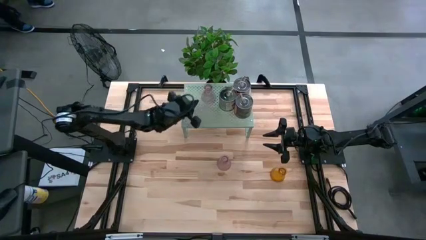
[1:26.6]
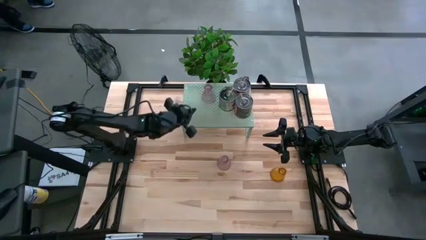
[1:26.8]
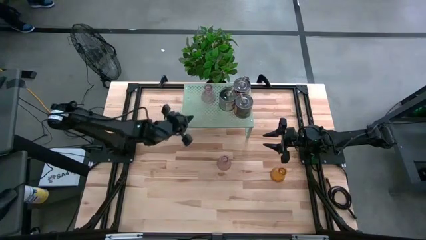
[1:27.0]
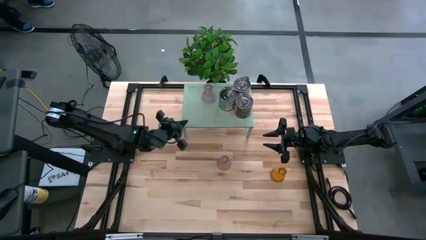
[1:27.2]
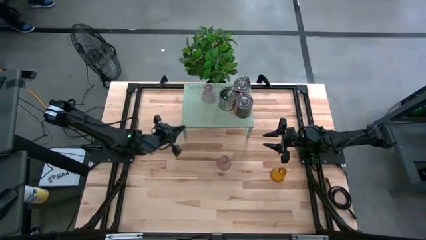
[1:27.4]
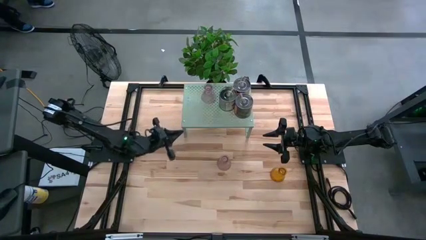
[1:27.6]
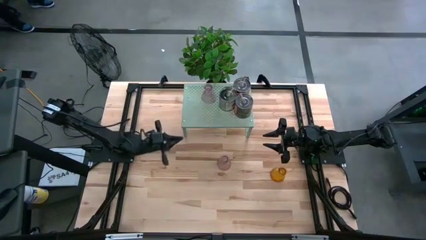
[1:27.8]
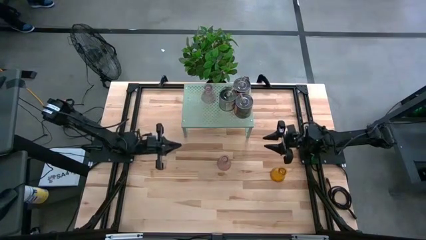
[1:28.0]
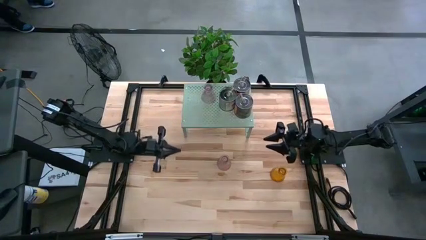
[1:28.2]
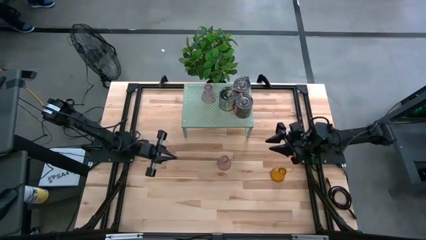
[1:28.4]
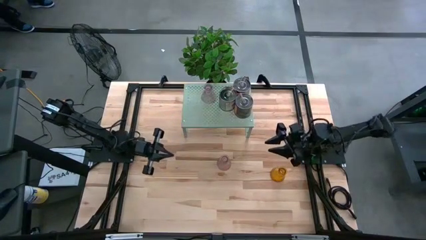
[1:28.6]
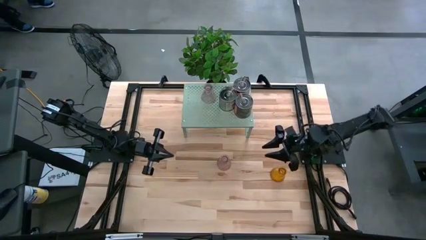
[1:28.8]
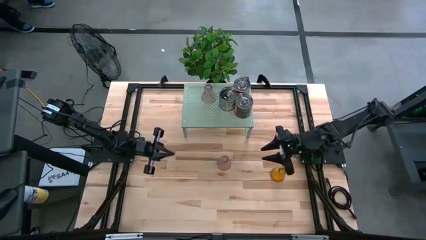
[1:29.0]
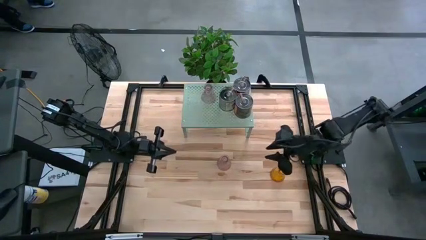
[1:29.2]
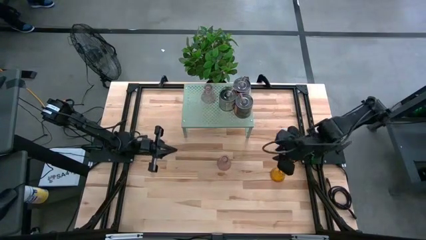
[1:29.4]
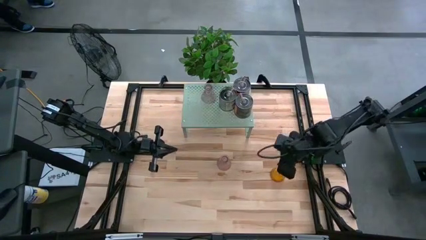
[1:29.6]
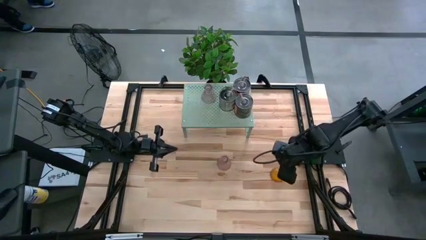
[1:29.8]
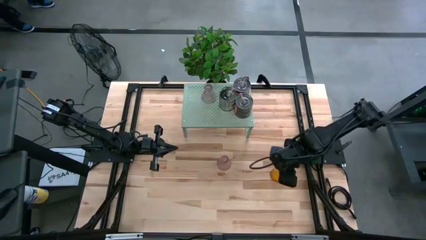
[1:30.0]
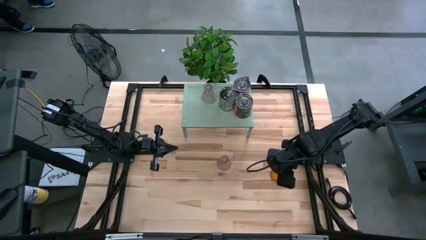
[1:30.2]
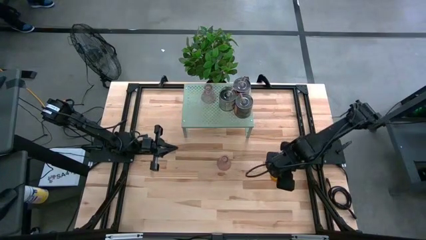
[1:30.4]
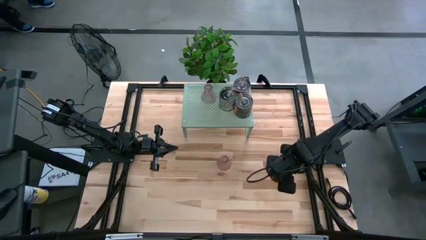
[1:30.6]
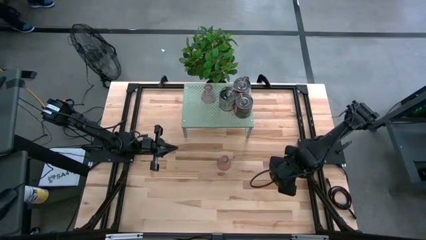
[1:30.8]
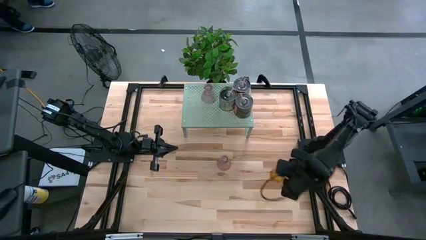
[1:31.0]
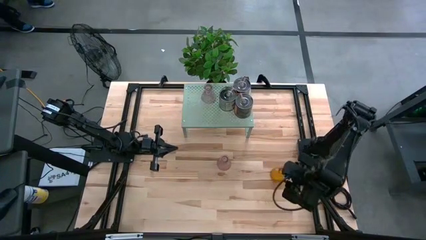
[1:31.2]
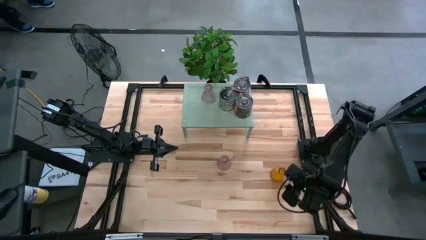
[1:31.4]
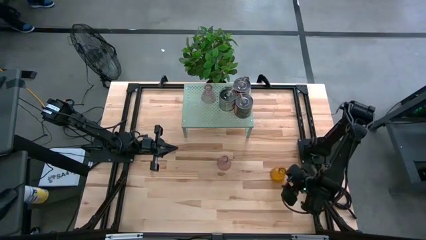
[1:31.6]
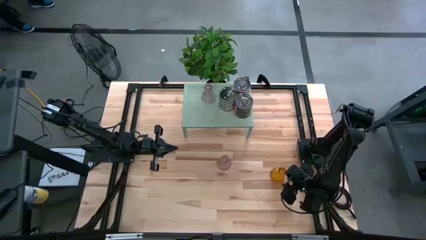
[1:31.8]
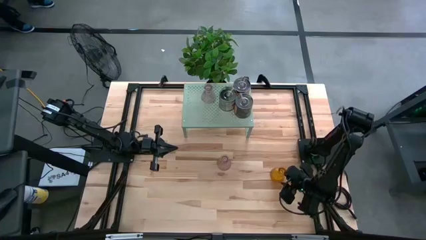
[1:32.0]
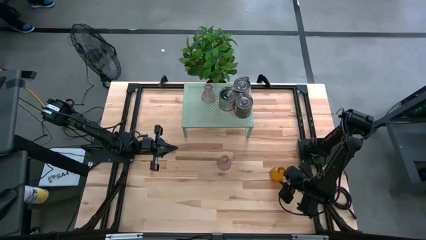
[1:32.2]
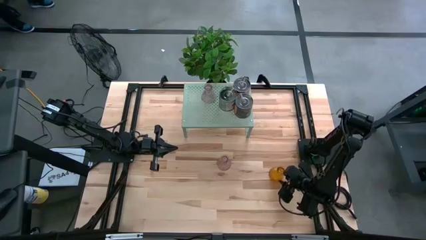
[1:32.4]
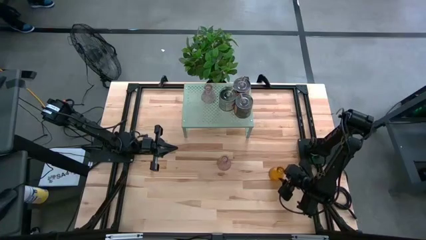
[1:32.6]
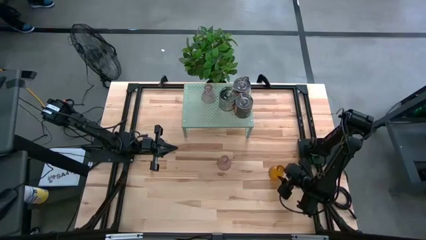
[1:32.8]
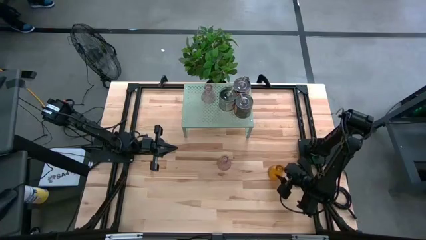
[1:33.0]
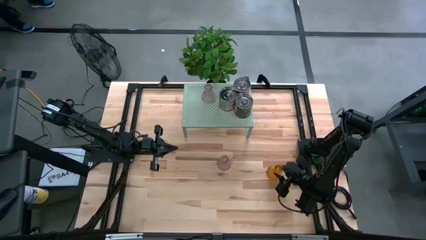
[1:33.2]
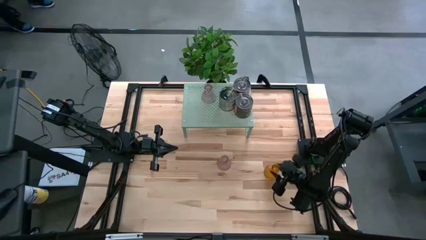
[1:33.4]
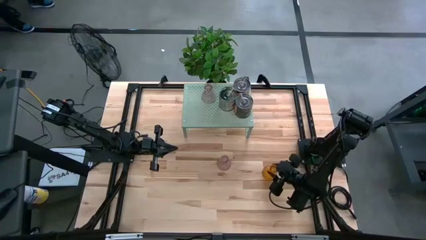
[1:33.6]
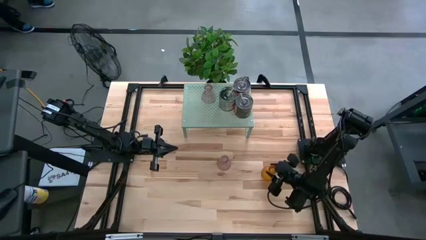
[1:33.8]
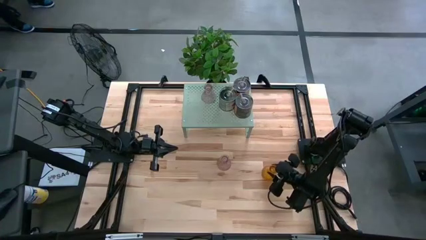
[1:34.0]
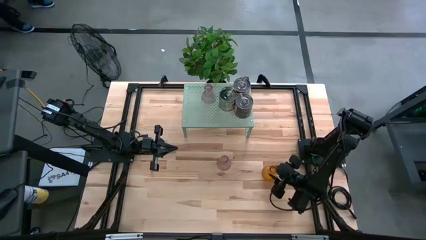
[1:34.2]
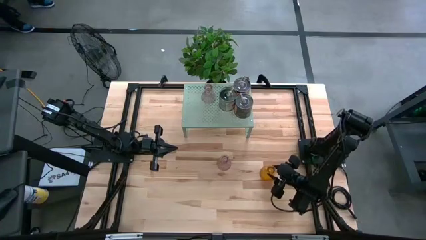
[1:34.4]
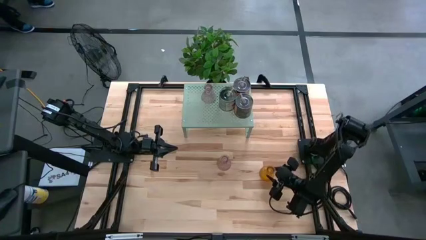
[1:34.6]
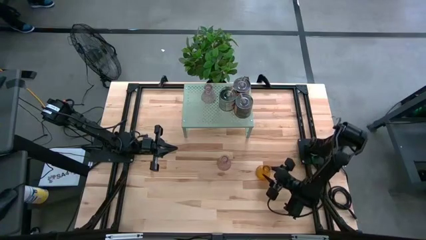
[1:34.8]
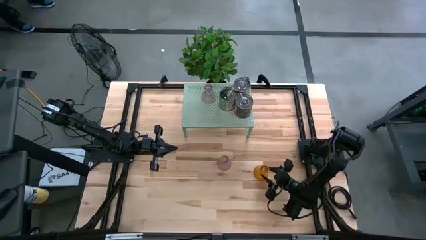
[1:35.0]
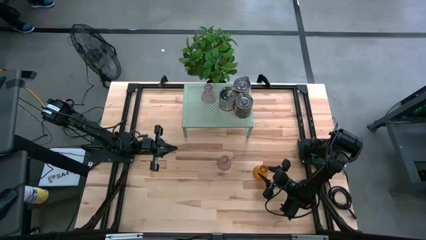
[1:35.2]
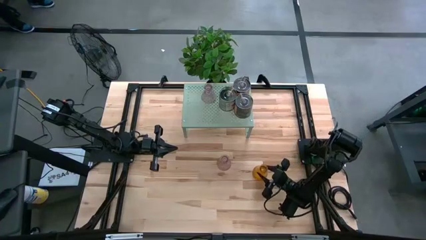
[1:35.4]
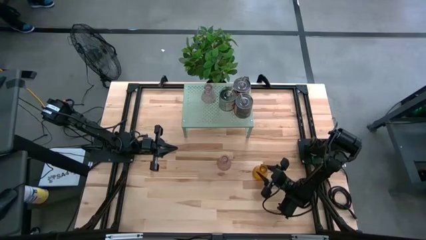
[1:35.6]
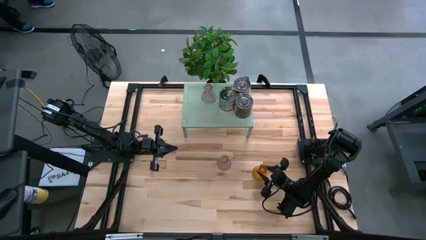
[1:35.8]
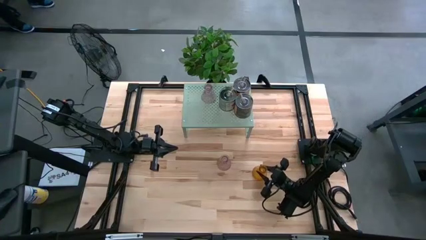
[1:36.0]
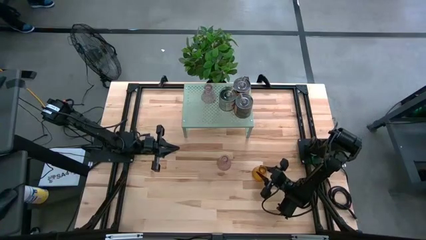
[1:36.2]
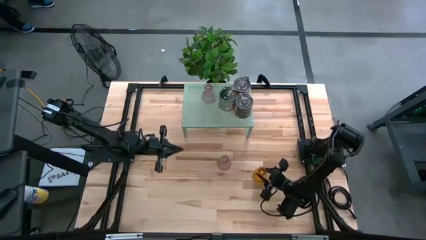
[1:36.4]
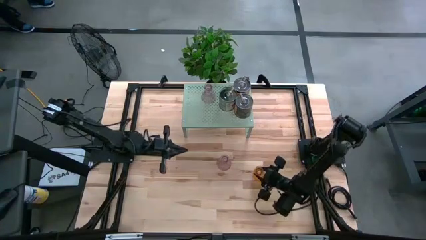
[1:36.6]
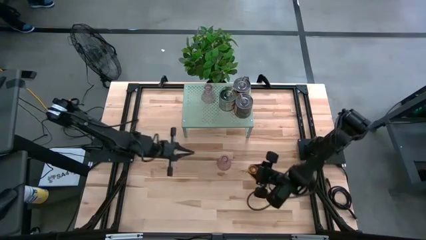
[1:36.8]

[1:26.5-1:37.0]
Task: Pick & Place candle stick holders
Put the yellow glass candle holder on the shelf

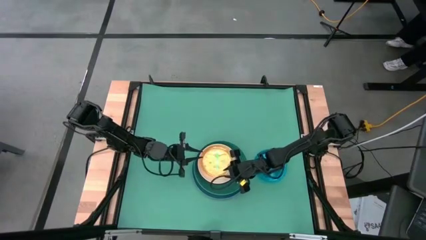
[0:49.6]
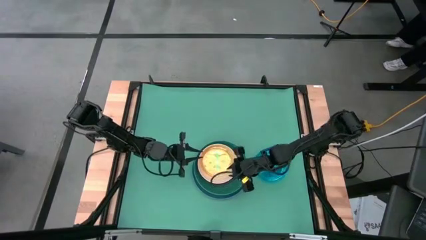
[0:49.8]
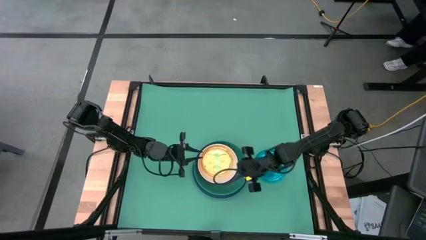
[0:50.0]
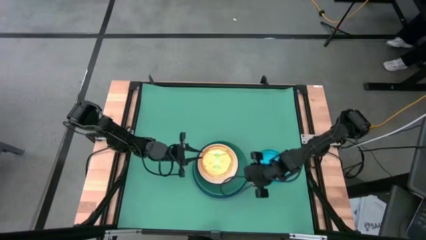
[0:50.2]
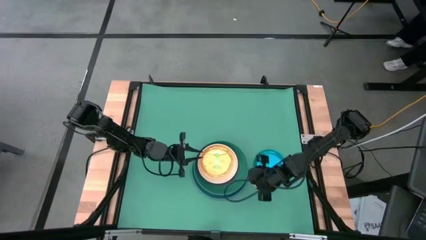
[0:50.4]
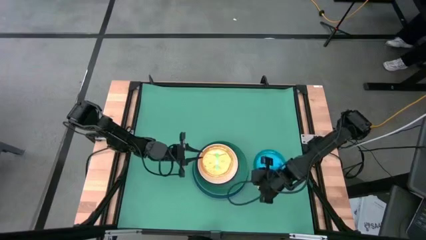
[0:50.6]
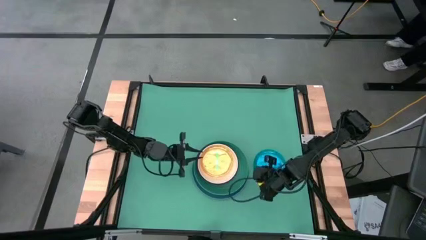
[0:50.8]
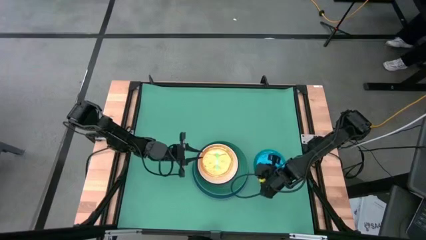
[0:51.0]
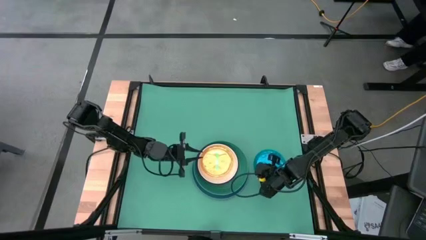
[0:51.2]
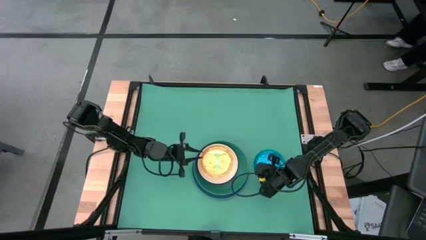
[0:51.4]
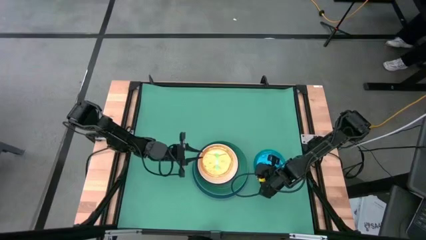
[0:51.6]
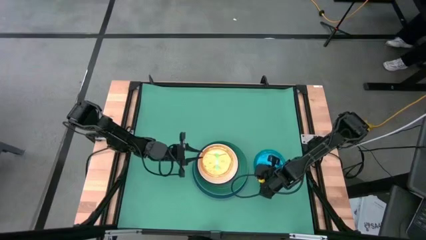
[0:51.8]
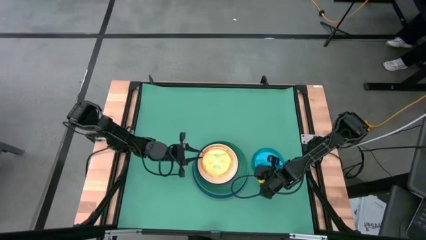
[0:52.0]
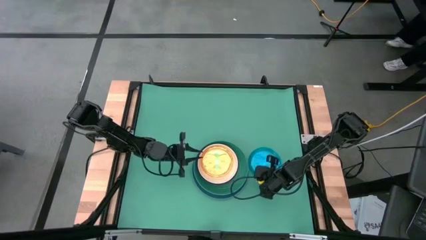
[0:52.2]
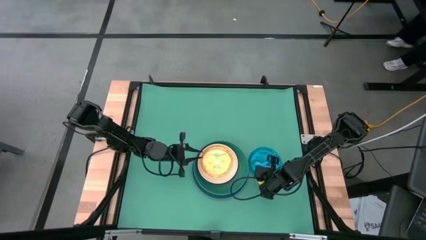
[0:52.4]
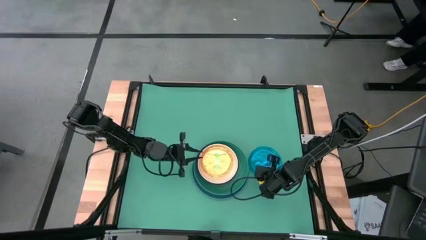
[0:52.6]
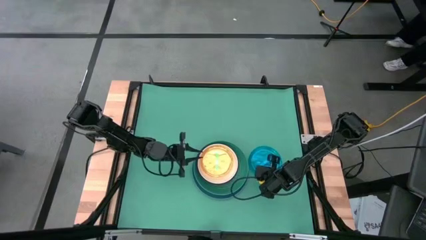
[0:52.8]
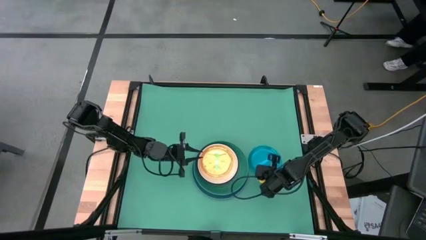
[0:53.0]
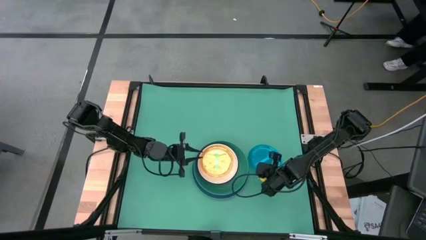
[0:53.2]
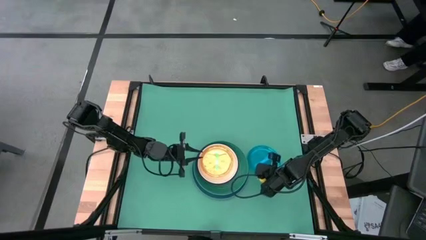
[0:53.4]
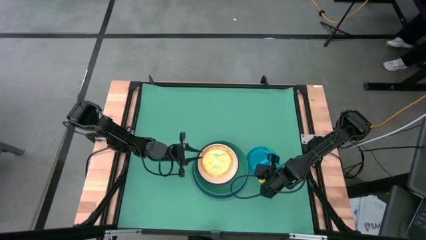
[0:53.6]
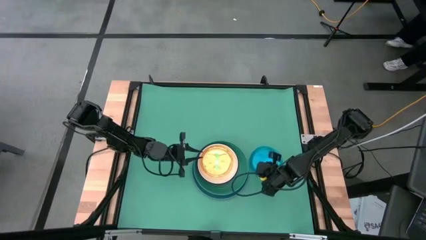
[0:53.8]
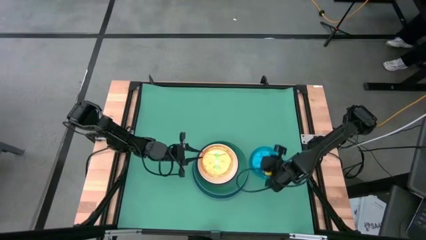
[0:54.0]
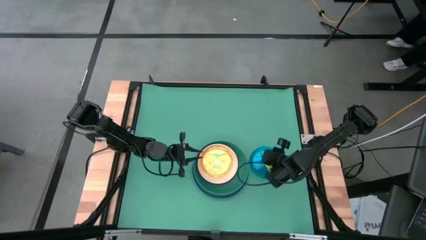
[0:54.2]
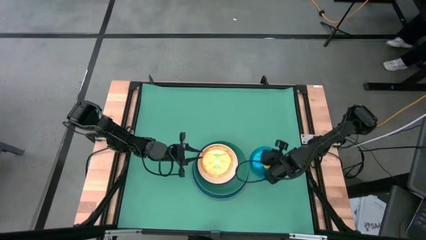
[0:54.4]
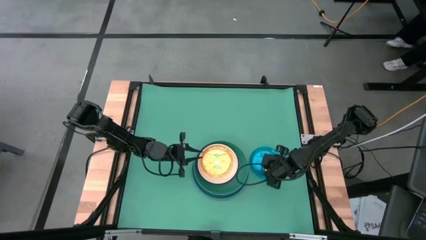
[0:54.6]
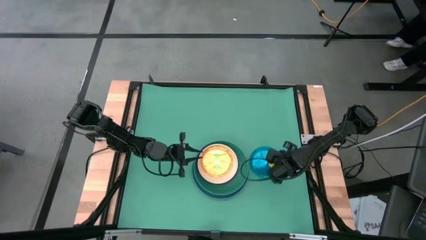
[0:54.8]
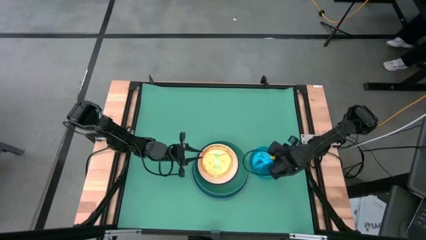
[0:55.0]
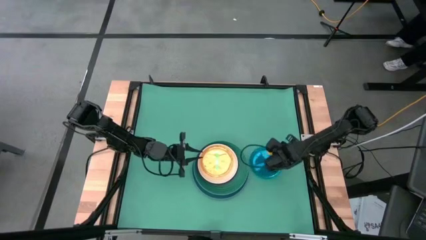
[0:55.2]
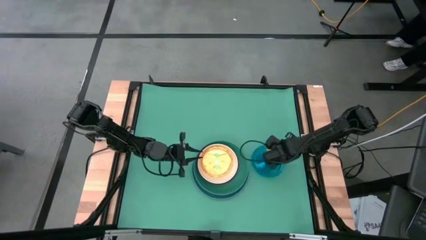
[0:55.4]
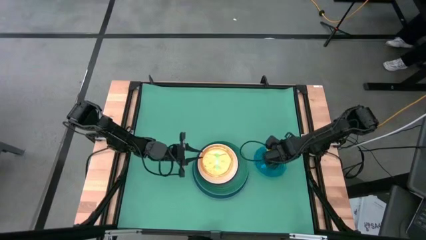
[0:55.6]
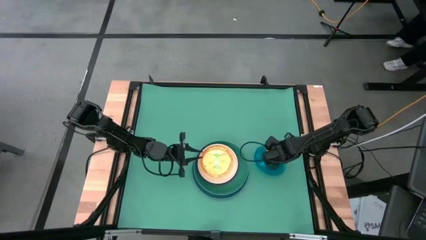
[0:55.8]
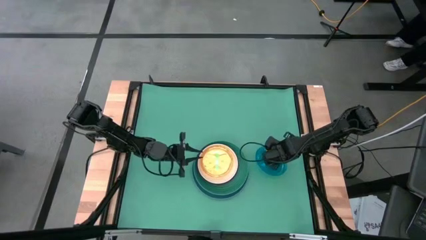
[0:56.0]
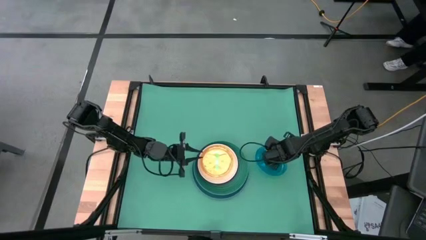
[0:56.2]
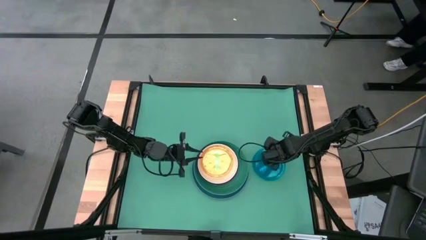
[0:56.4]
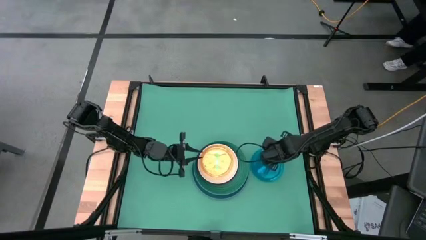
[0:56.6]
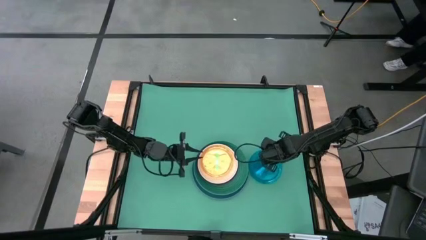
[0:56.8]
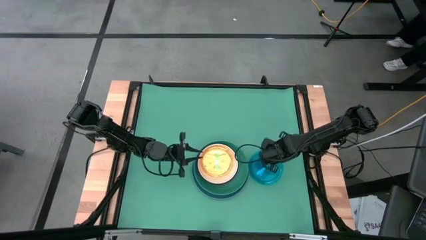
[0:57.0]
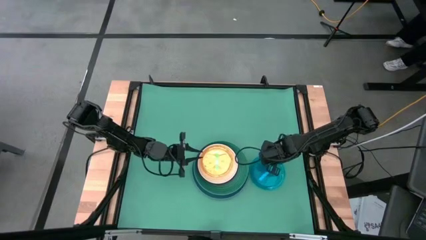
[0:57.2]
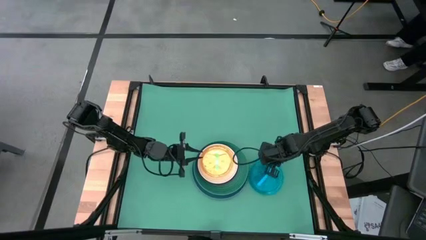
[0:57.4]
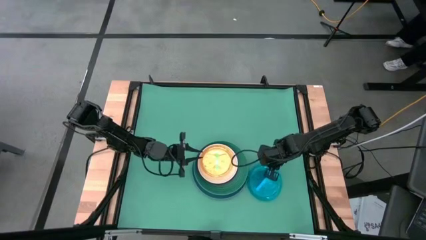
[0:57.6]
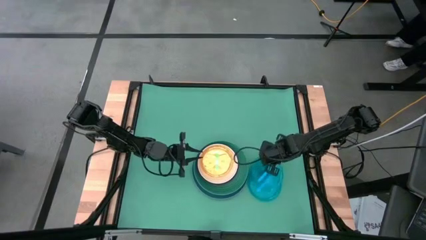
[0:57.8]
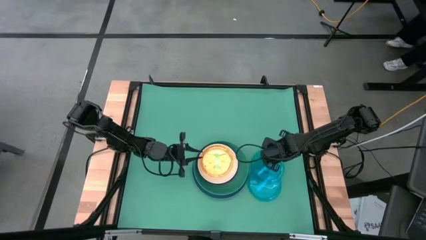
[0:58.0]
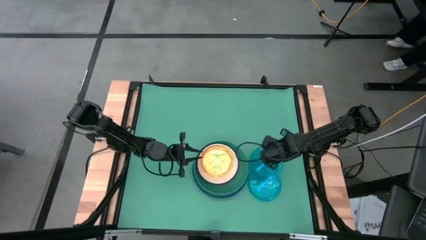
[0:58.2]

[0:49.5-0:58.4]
Task: Stack plastic plates
Stack the transparent light blue plate on top of the green plate
